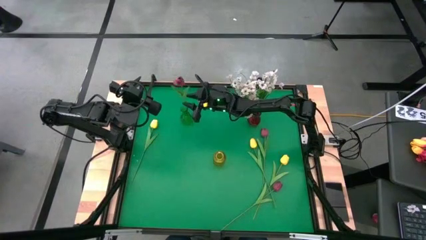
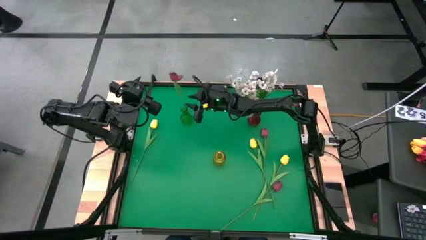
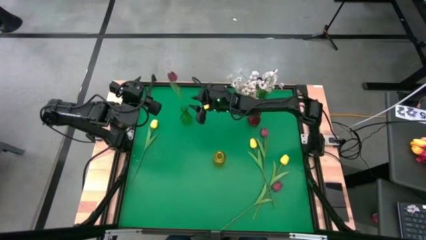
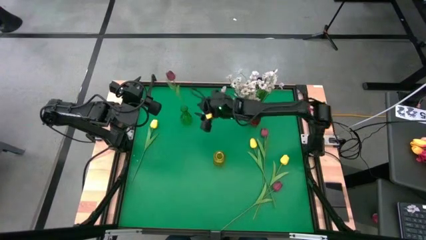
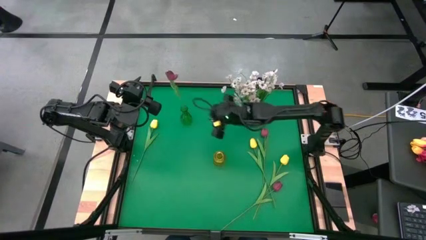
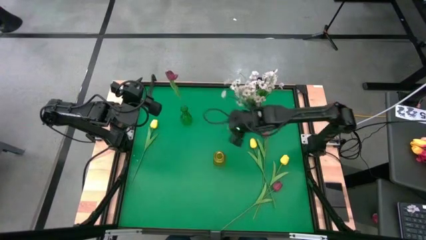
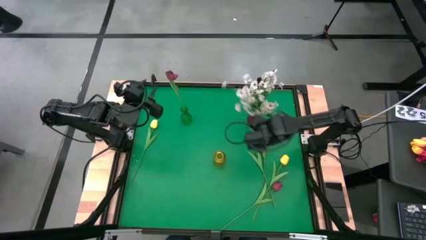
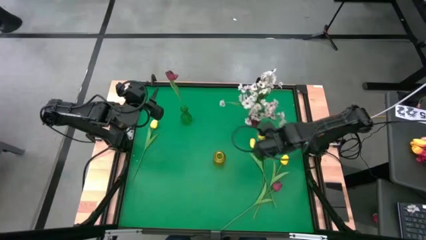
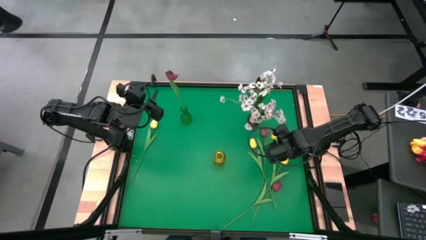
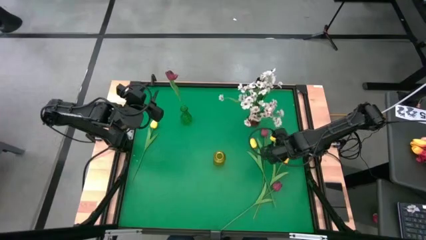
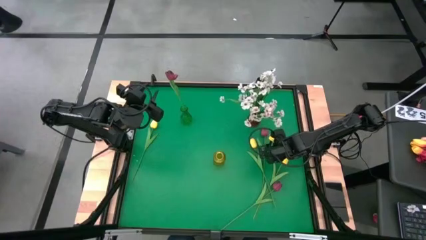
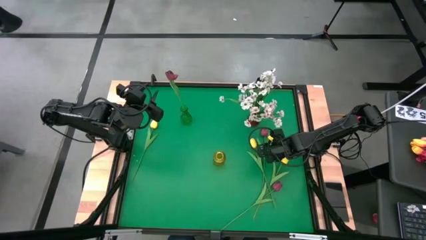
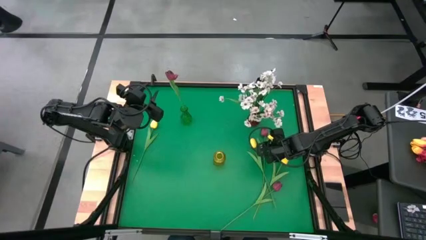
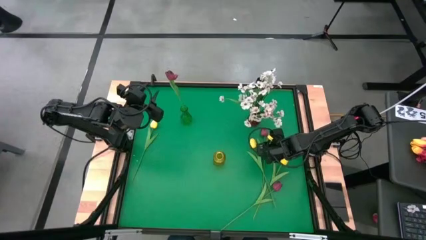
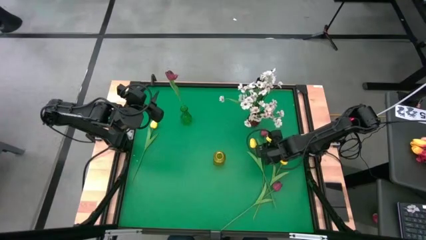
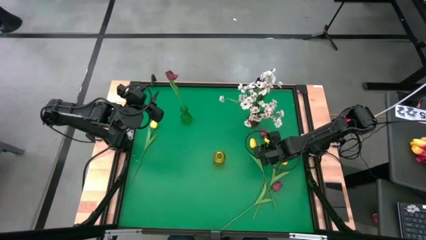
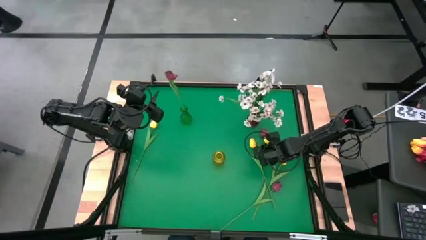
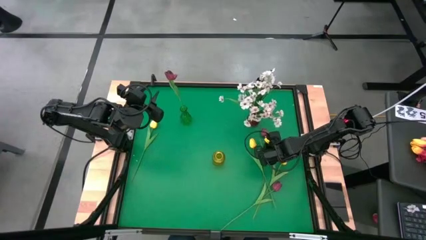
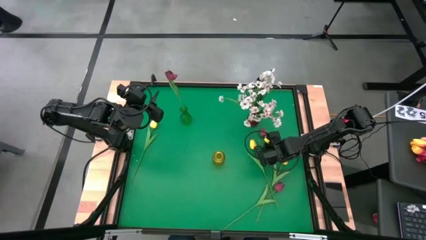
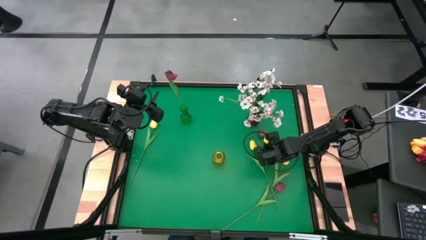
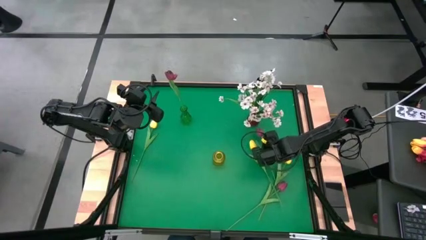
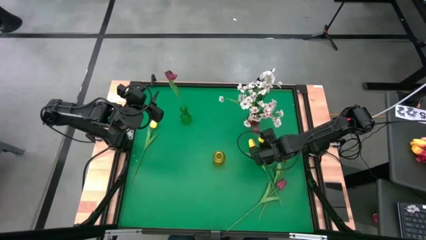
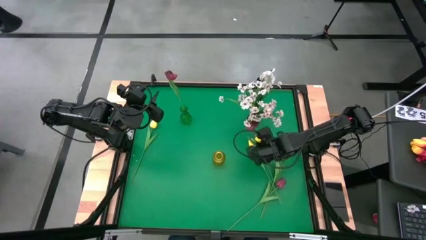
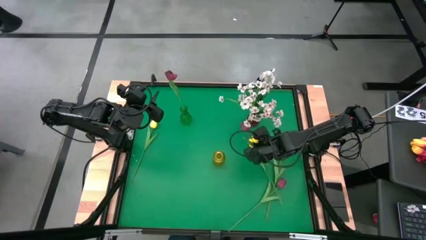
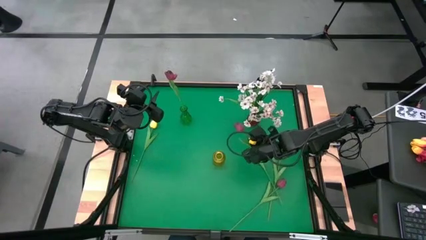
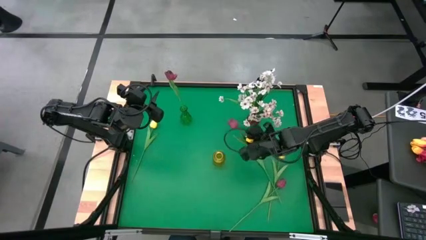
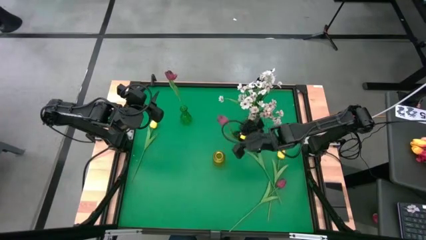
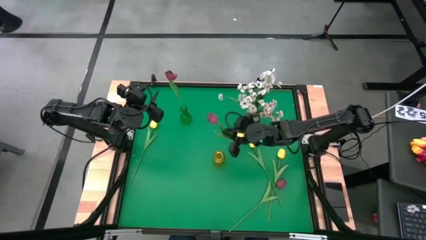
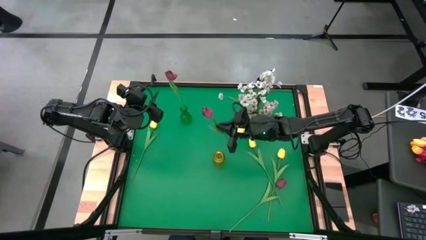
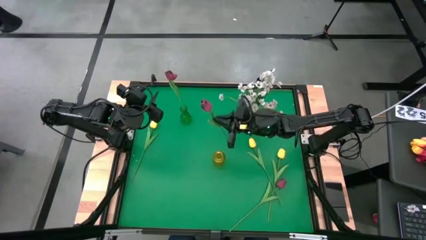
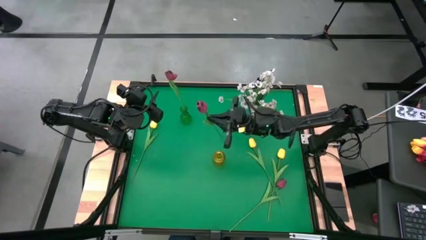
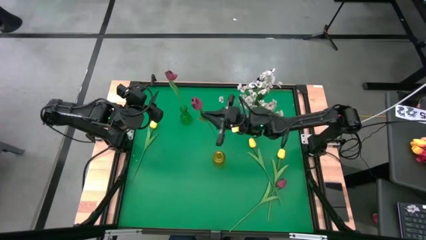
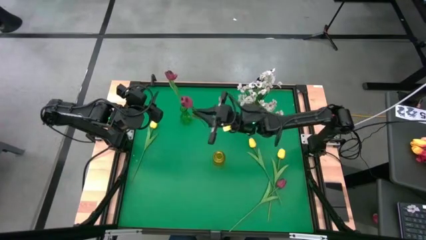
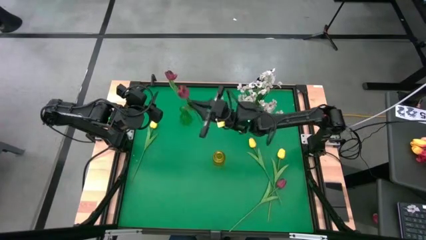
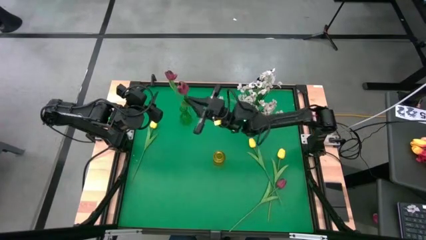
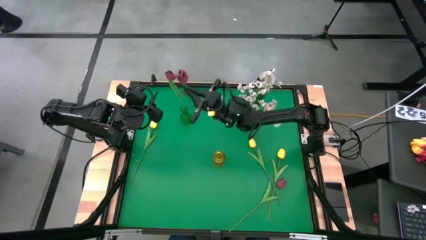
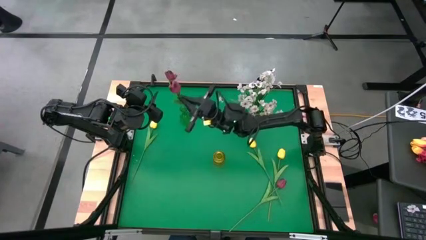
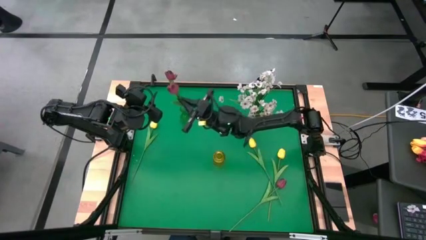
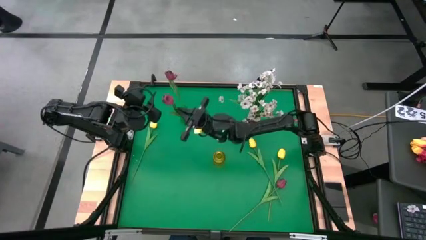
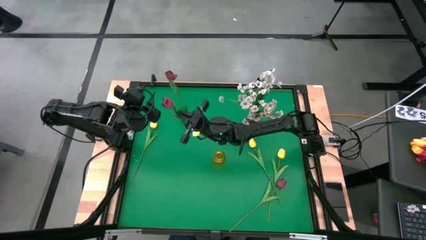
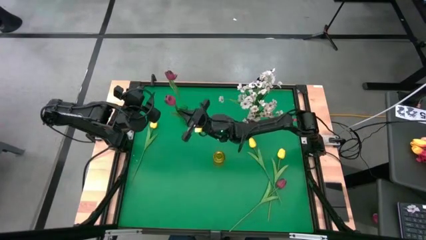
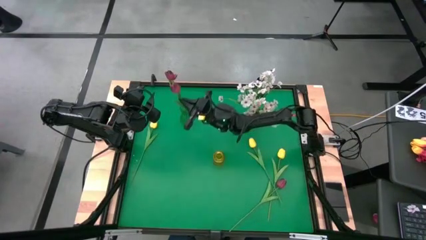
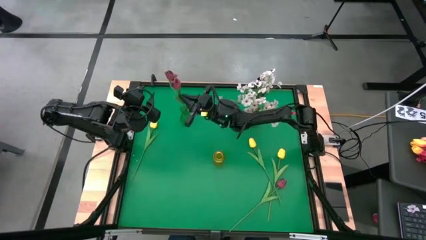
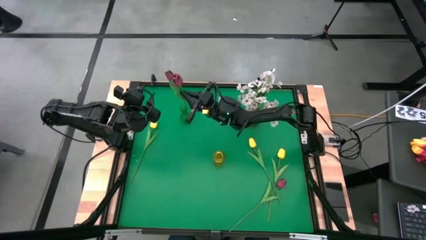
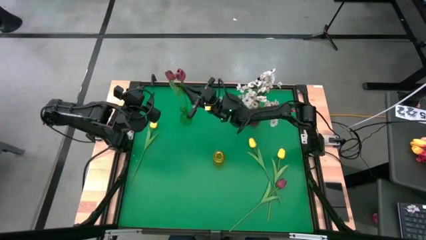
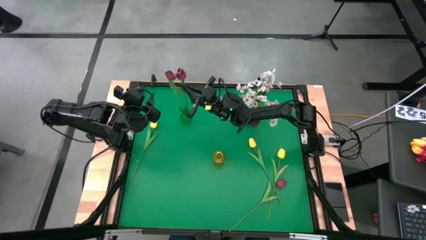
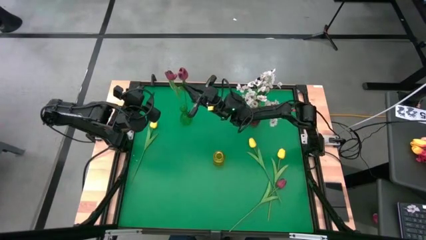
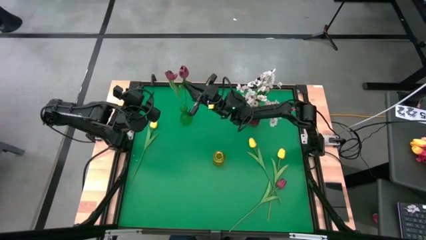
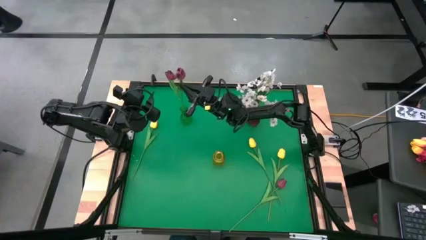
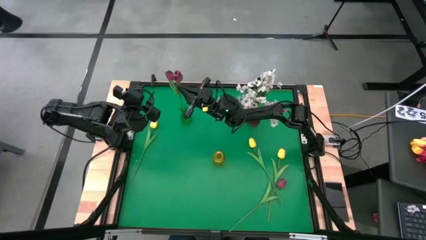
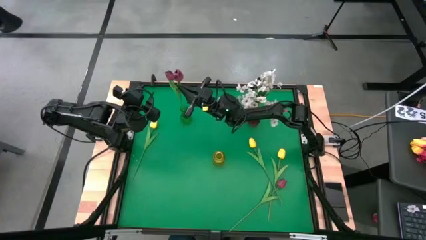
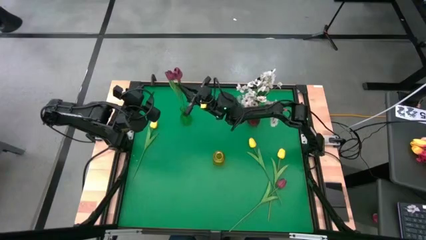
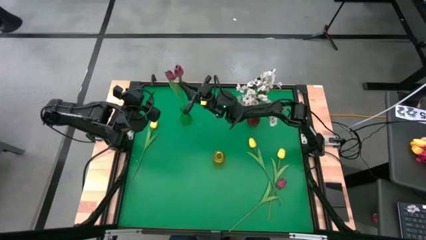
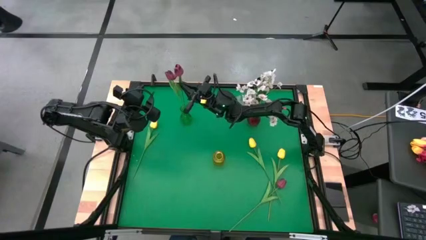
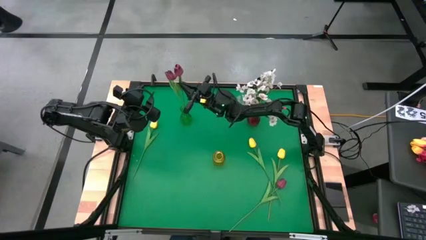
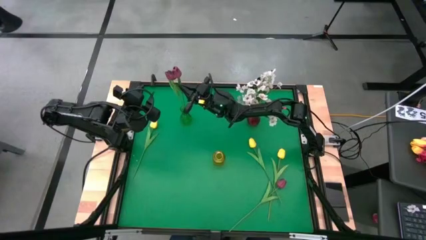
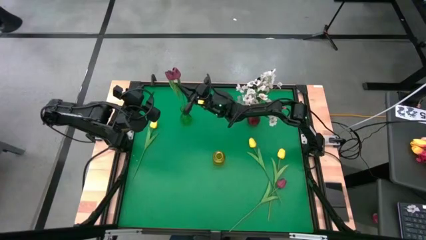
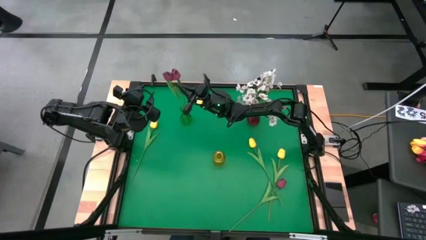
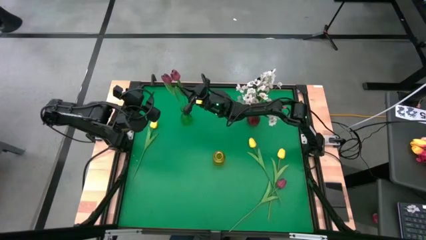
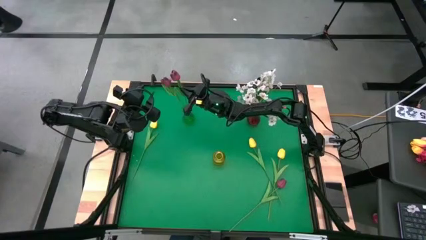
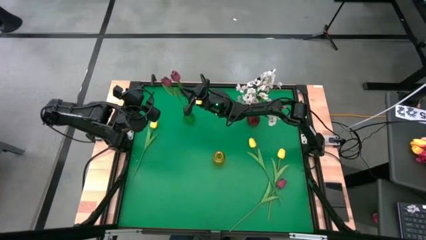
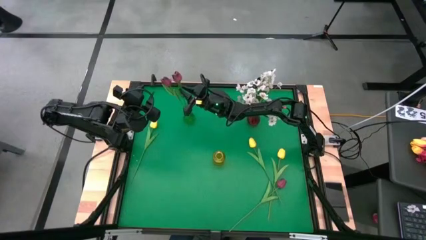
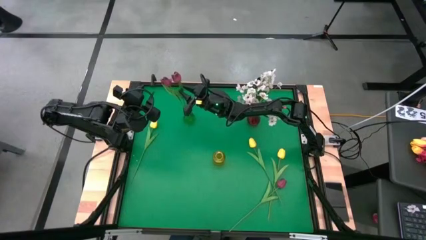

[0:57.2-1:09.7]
Task: Sort flowers into vase by color
Put the left red flower into the green vase
